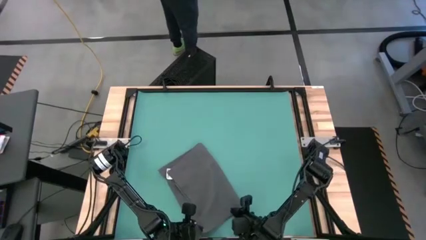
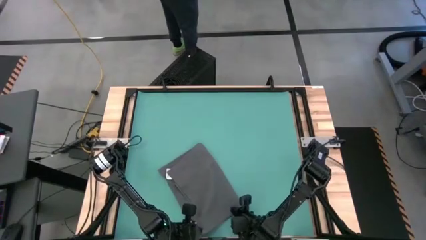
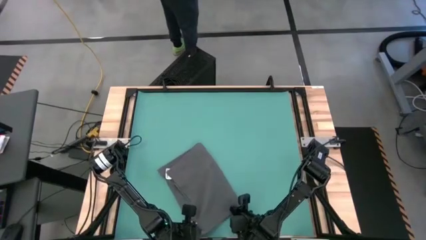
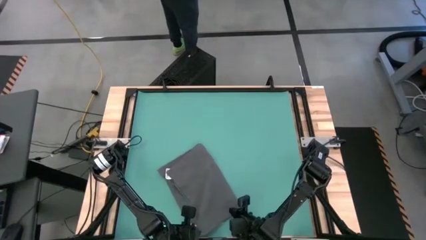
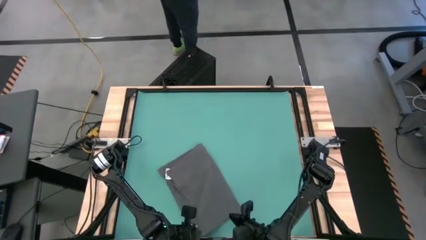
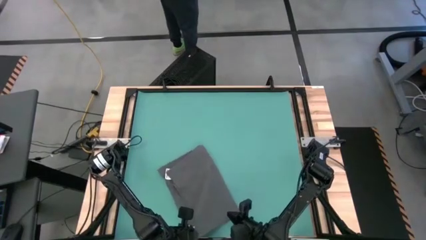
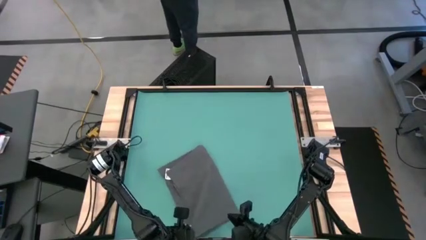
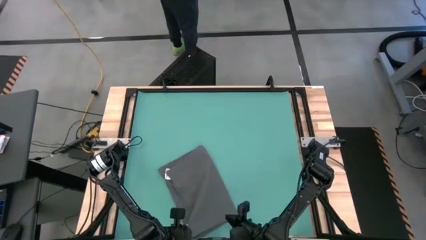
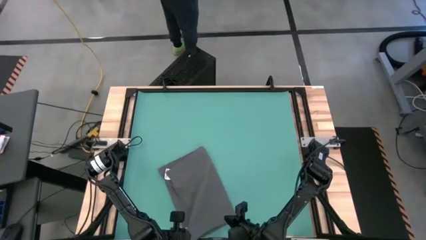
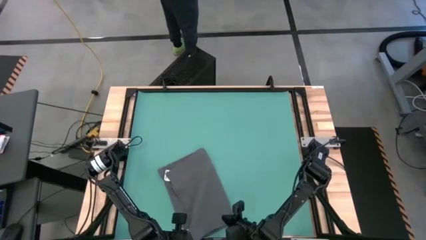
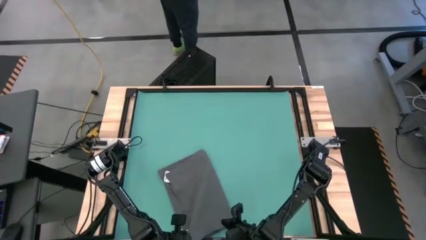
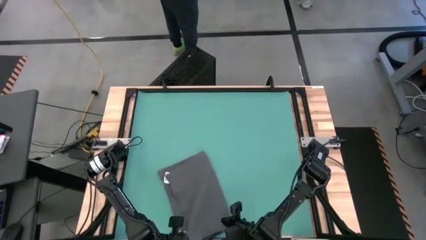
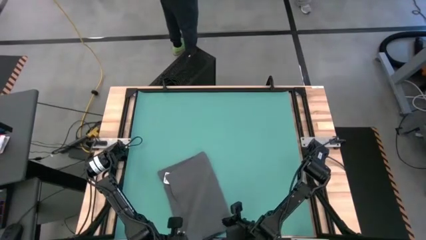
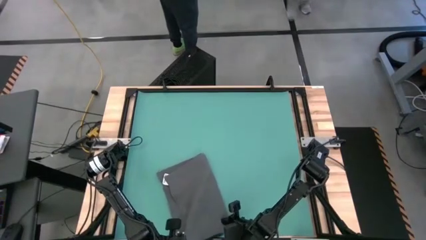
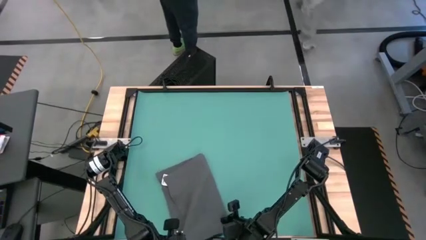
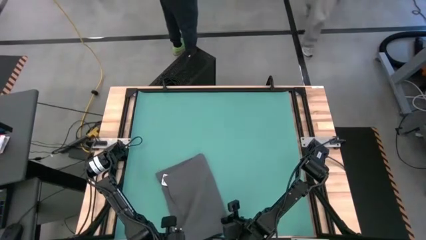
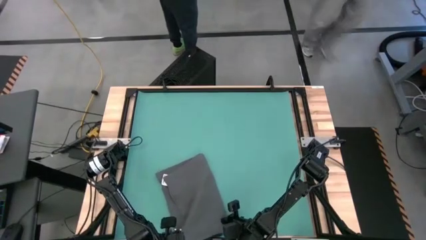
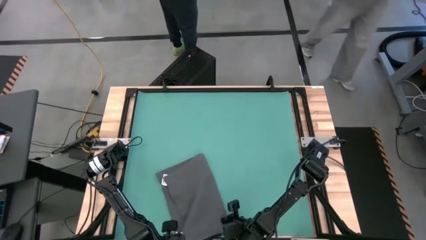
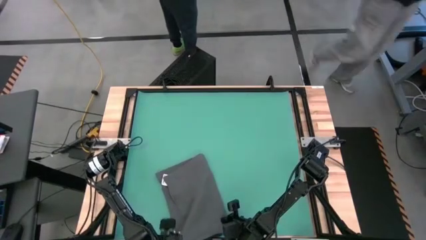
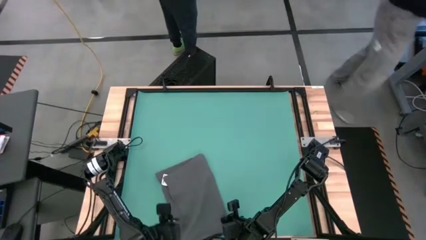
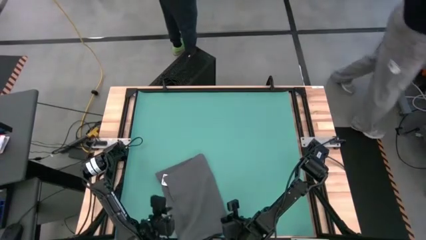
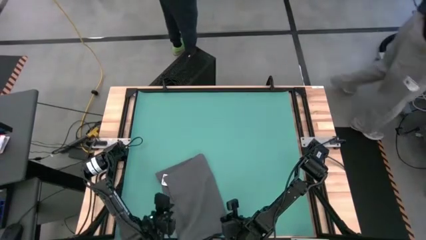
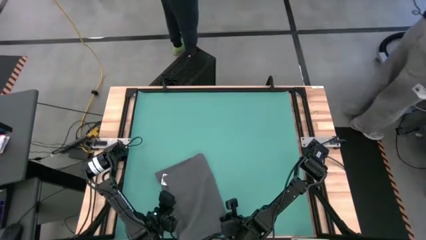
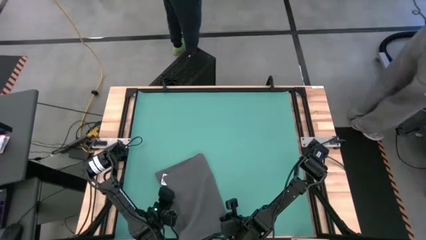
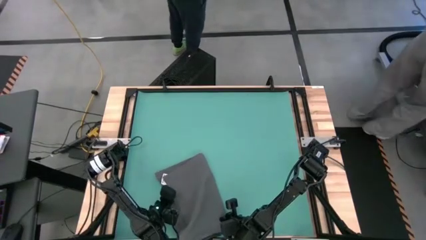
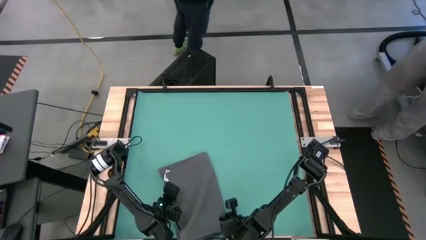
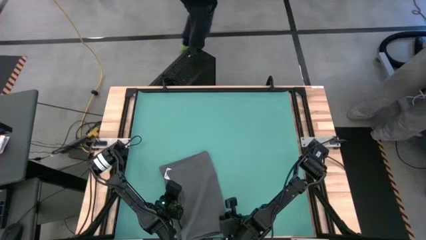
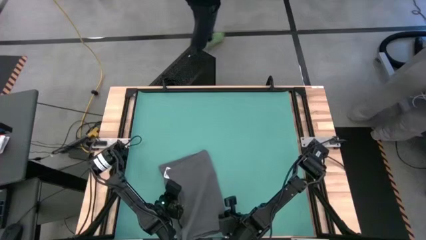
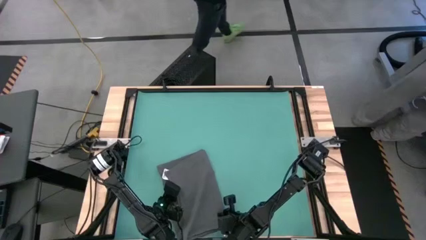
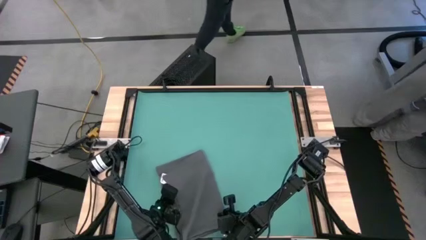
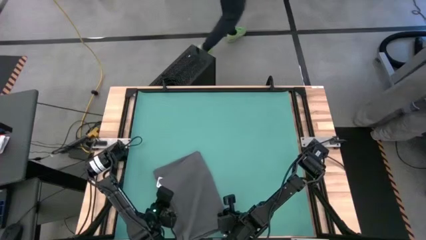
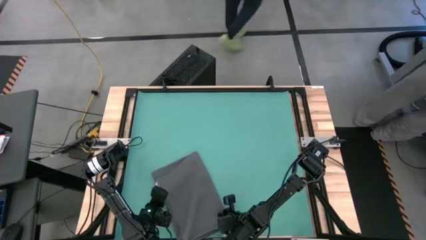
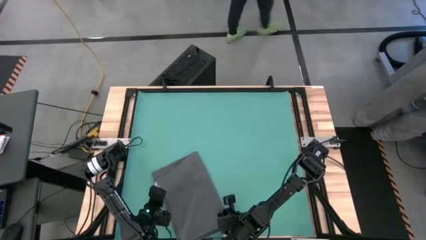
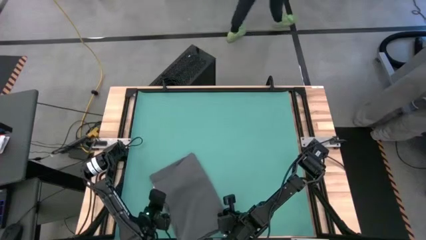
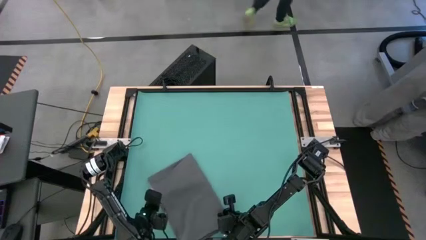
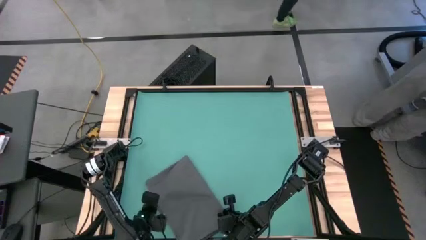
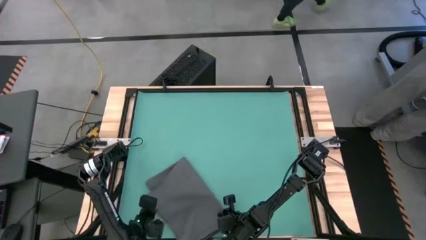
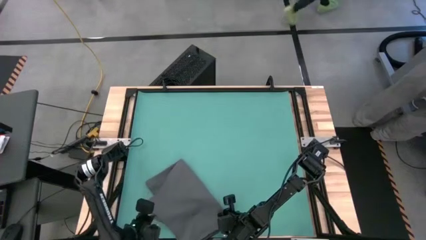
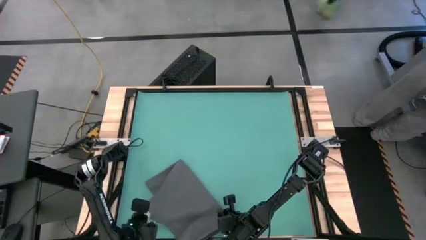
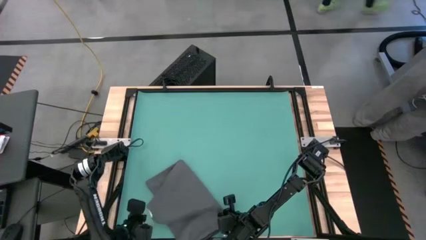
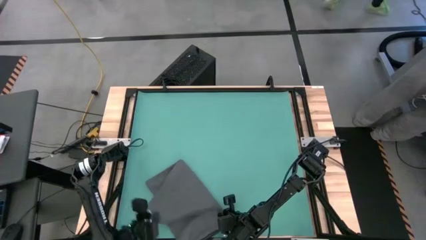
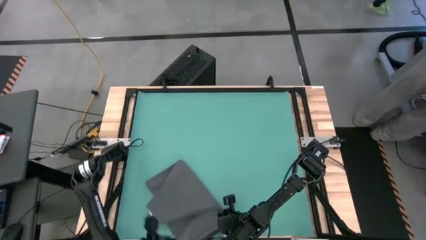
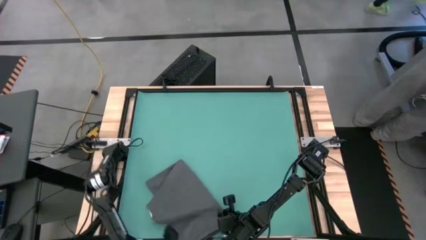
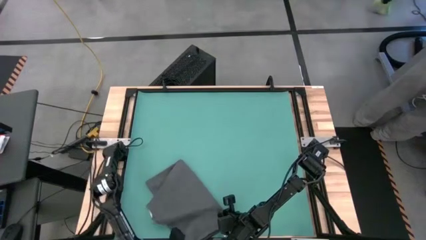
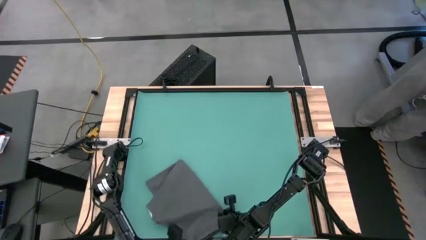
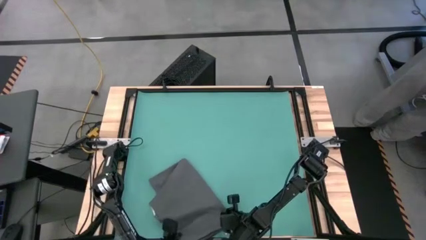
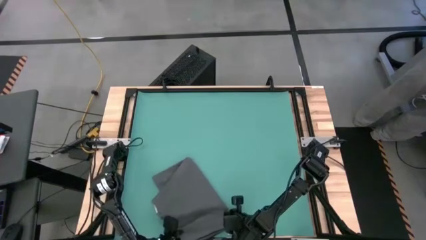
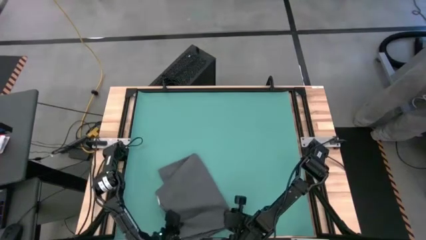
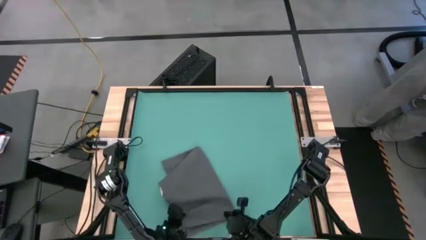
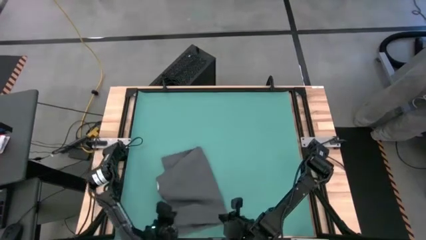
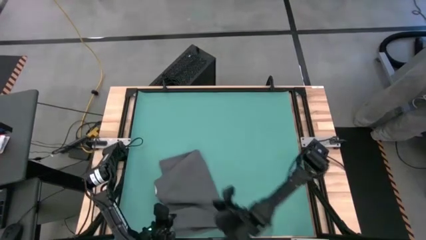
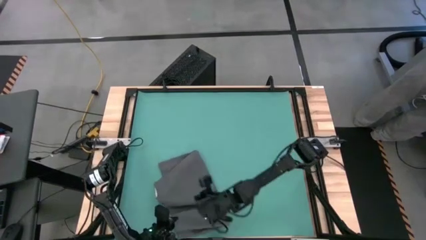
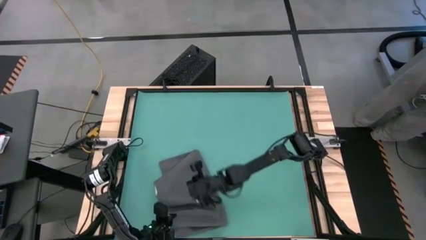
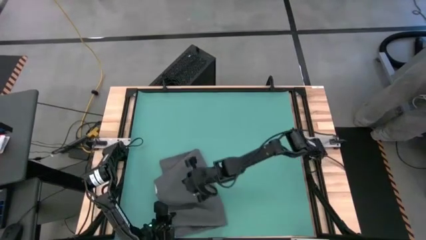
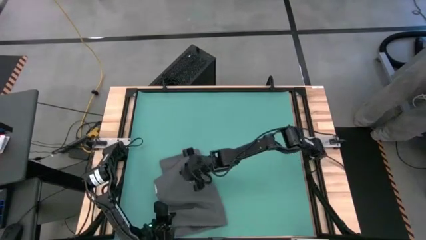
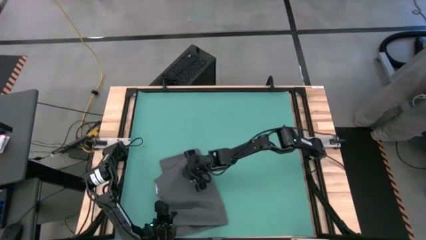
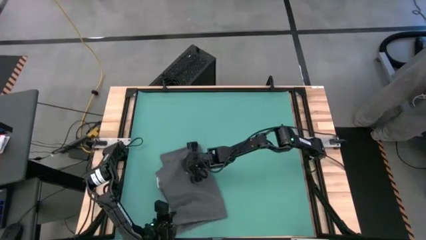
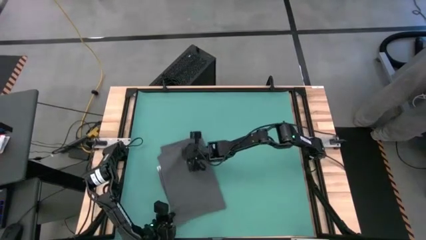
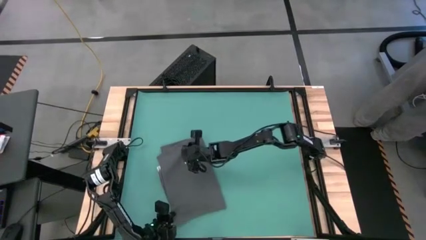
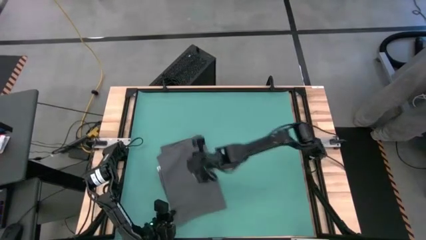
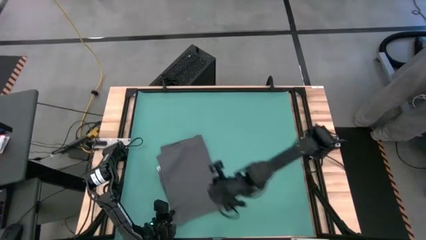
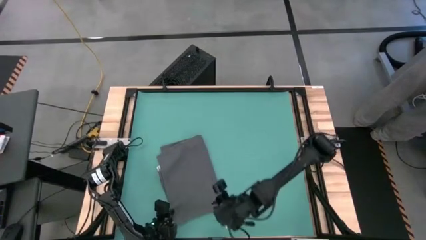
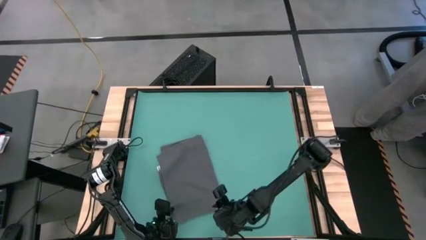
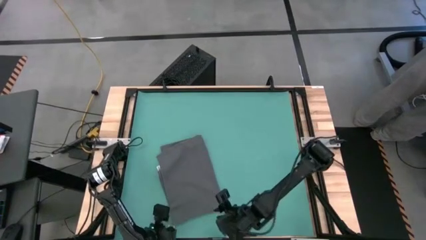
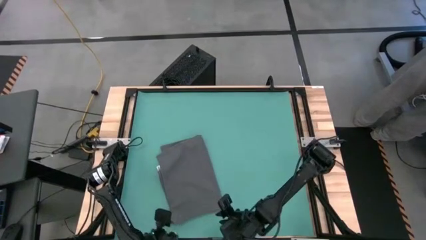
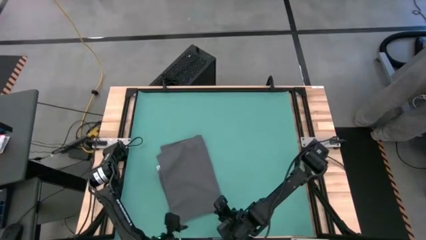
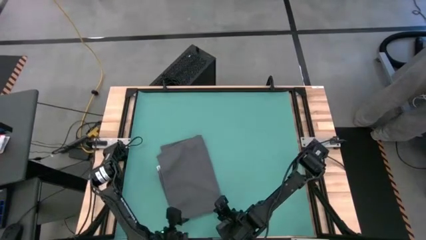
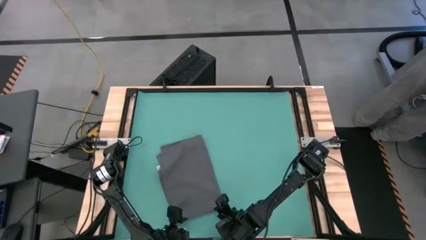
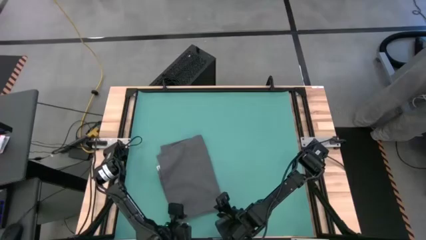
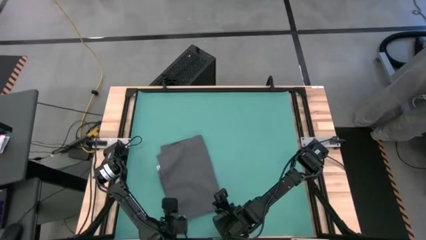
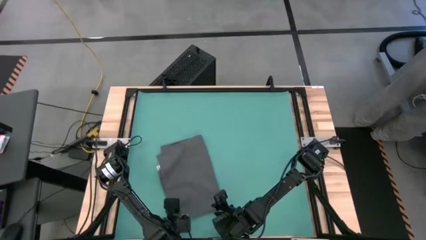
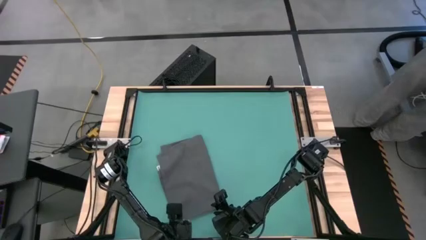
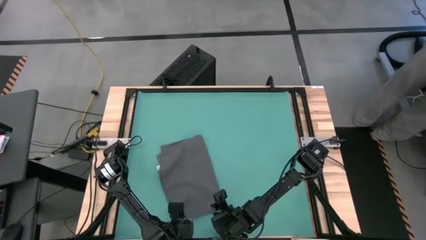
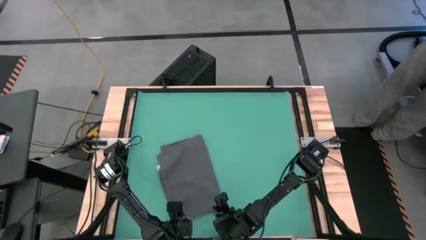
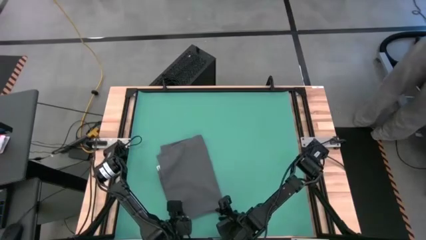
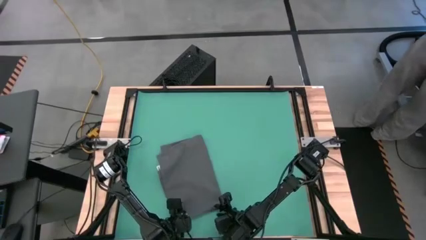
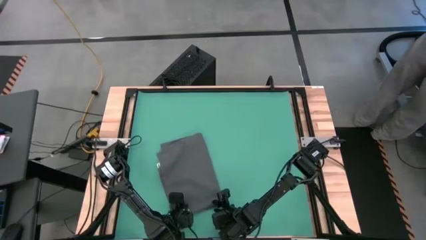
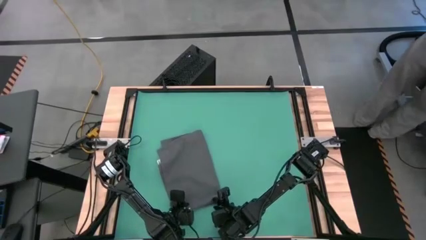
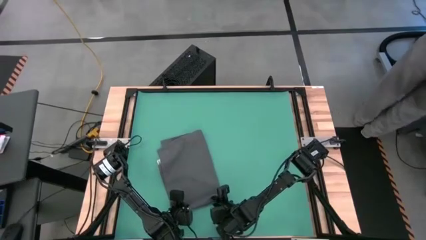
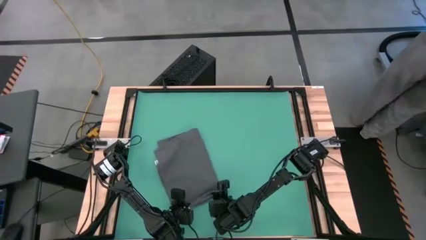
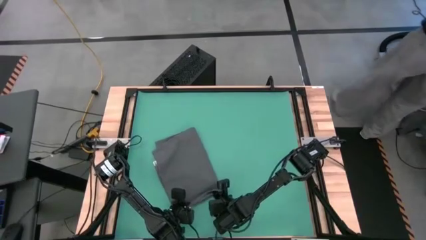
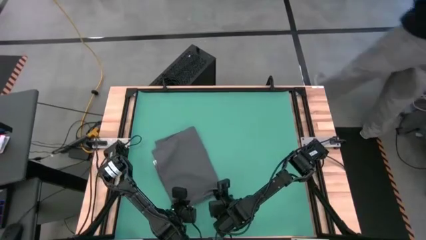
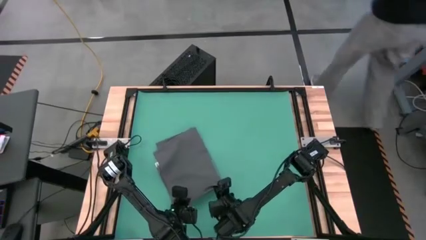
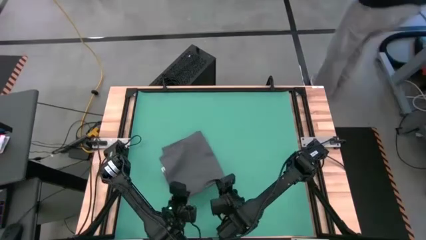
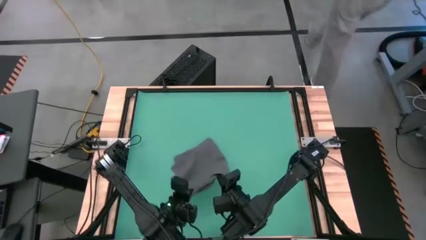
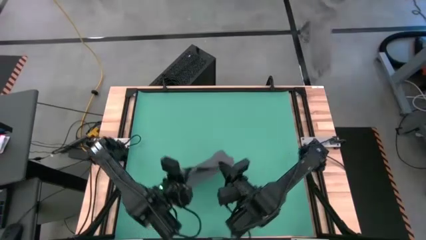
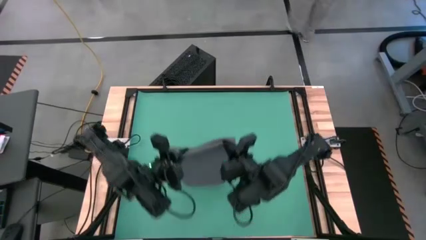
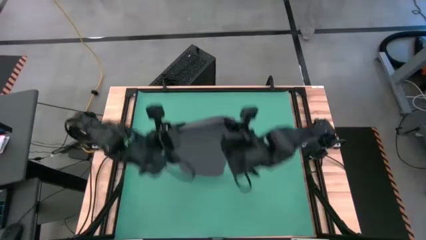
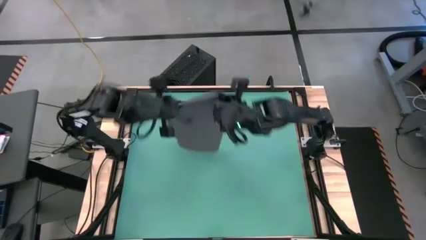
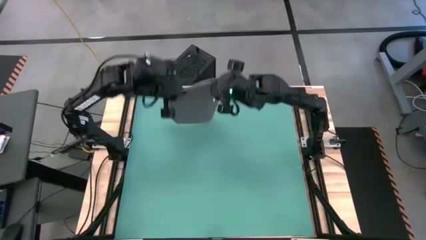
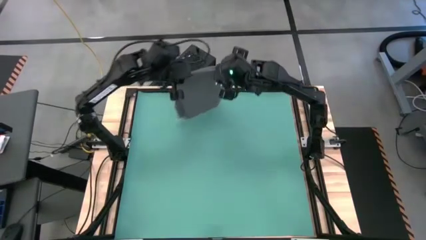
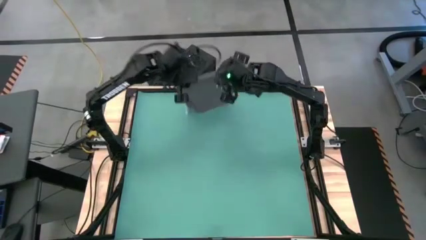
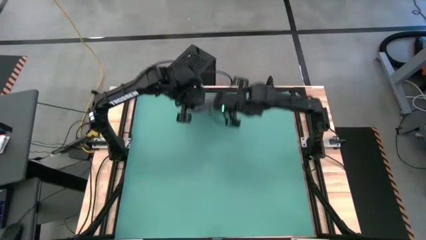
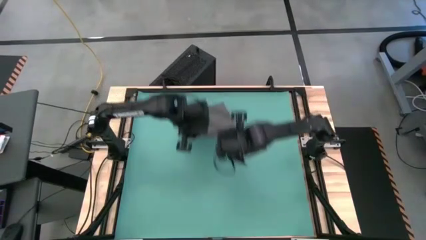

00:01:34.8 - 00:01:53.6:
Task: Roll towel
Roll the gray towel
